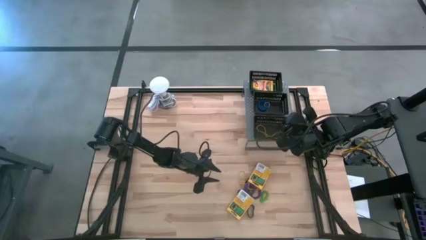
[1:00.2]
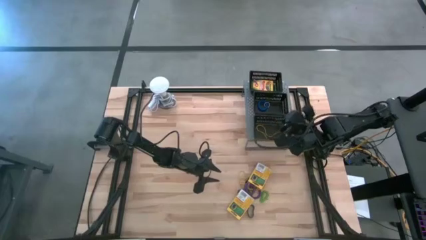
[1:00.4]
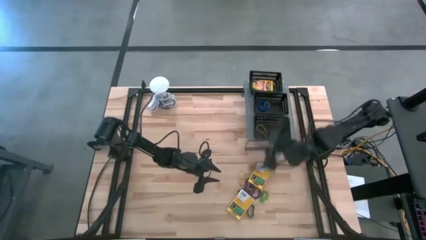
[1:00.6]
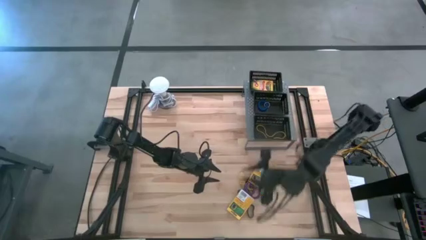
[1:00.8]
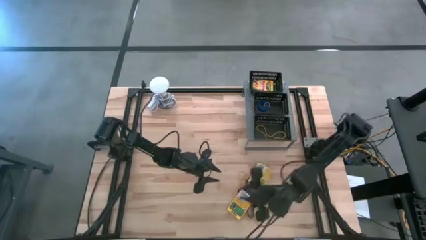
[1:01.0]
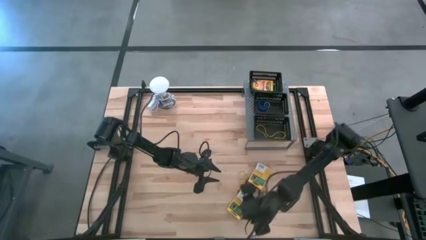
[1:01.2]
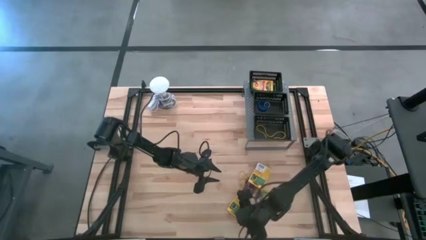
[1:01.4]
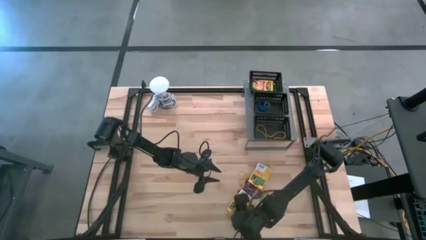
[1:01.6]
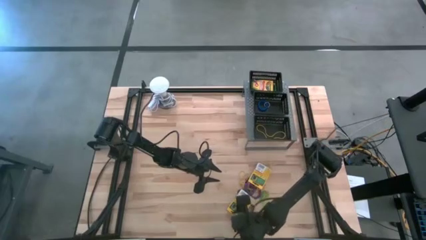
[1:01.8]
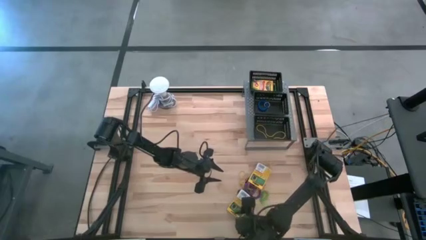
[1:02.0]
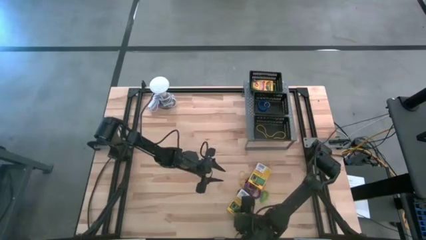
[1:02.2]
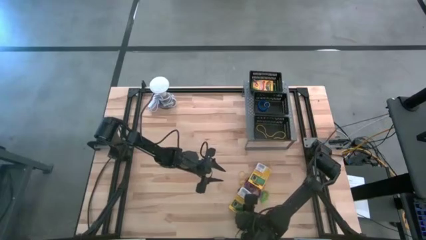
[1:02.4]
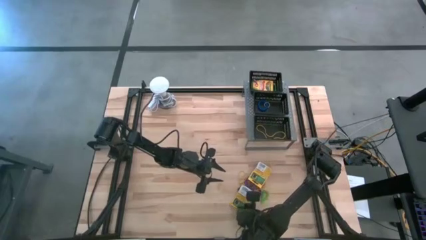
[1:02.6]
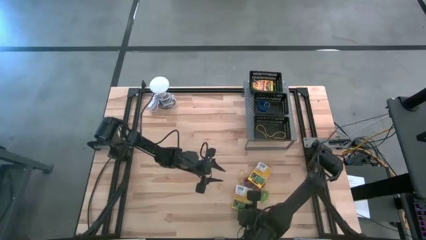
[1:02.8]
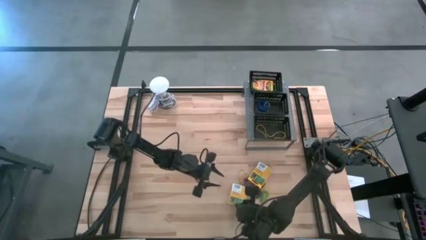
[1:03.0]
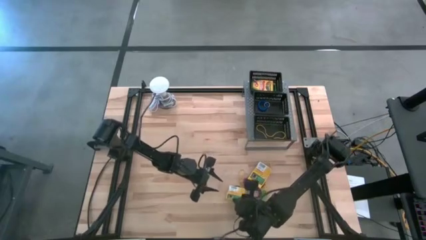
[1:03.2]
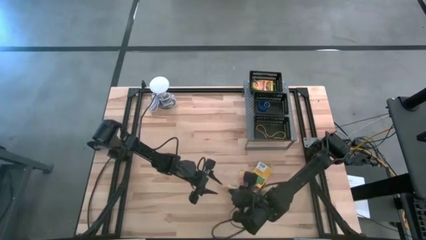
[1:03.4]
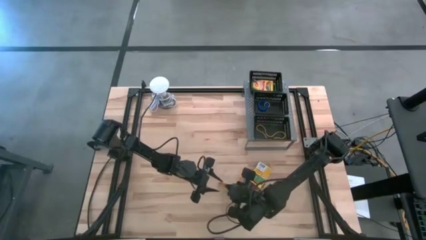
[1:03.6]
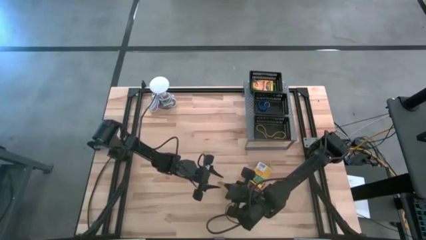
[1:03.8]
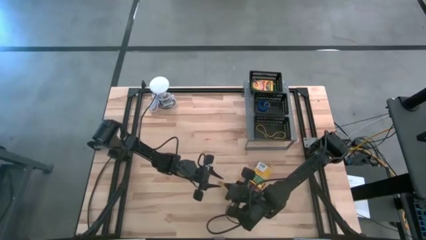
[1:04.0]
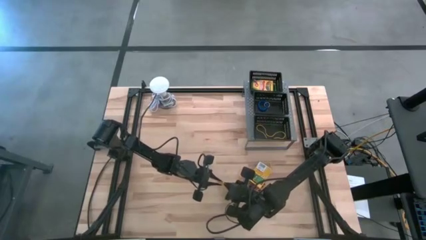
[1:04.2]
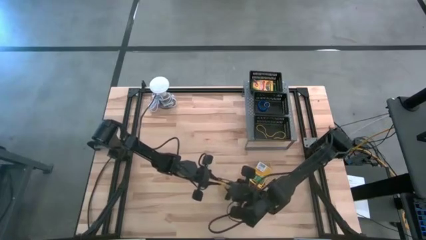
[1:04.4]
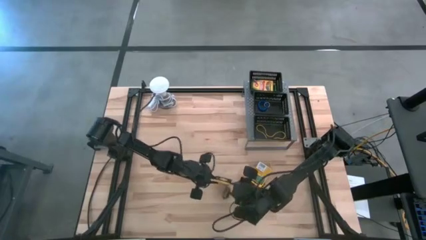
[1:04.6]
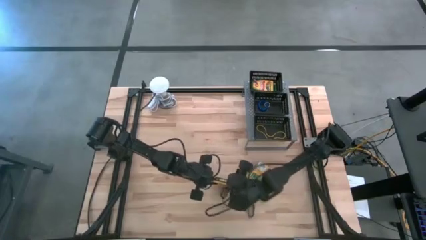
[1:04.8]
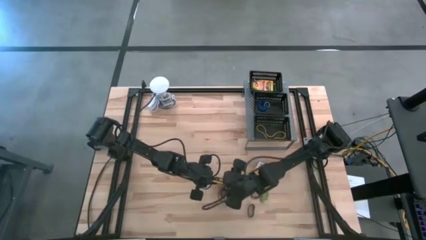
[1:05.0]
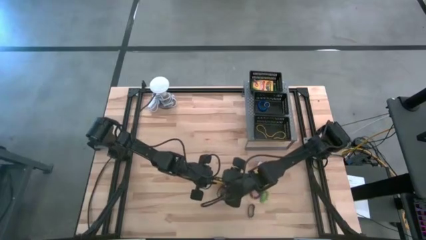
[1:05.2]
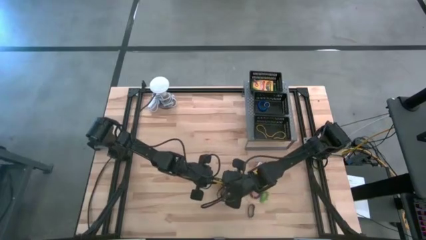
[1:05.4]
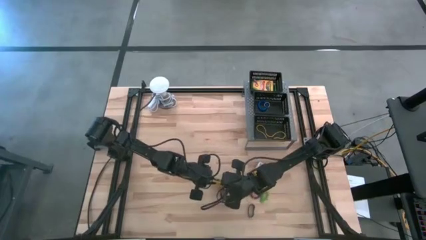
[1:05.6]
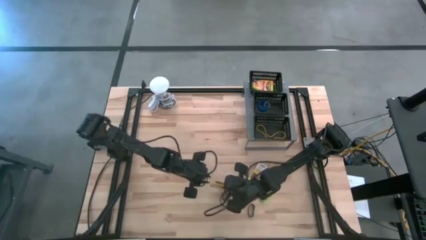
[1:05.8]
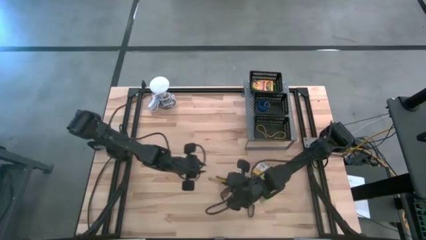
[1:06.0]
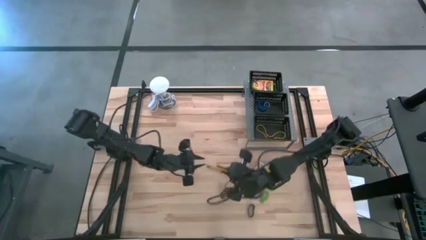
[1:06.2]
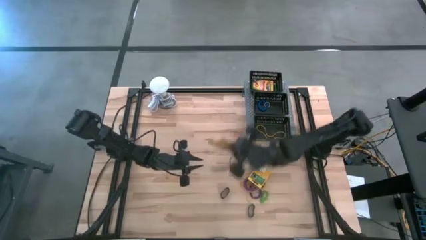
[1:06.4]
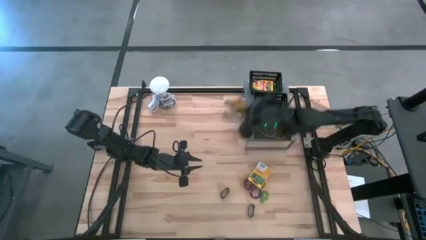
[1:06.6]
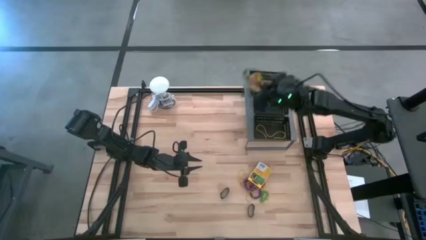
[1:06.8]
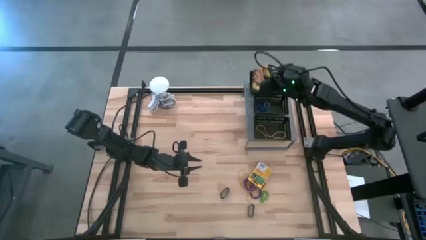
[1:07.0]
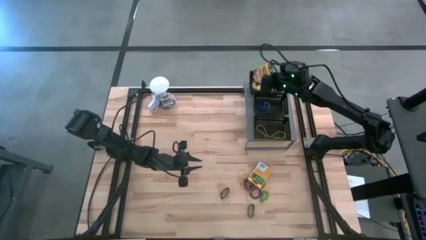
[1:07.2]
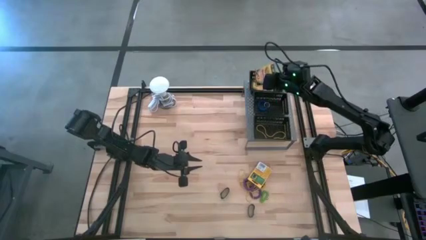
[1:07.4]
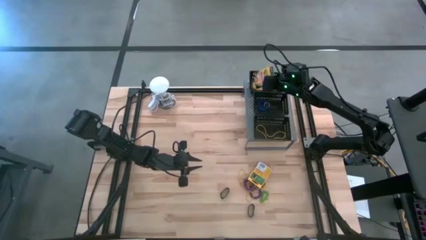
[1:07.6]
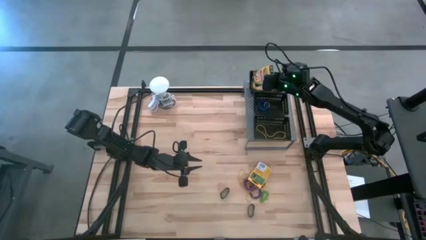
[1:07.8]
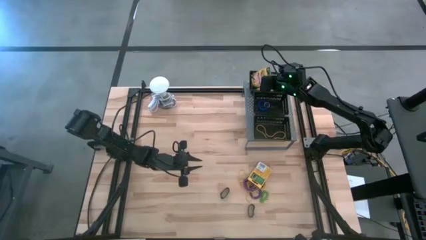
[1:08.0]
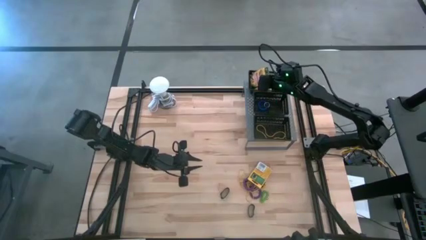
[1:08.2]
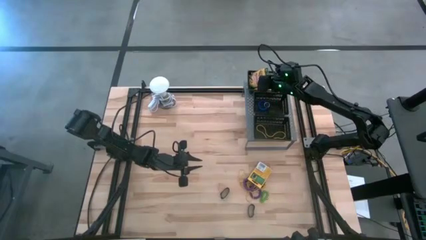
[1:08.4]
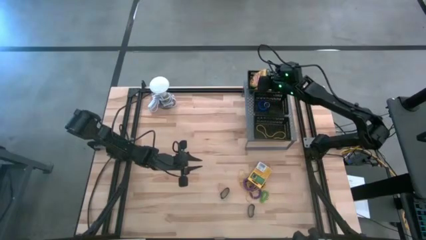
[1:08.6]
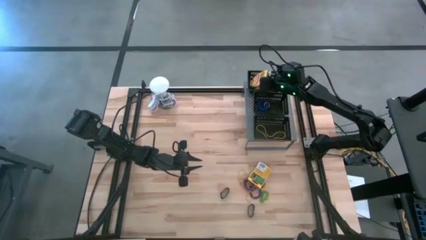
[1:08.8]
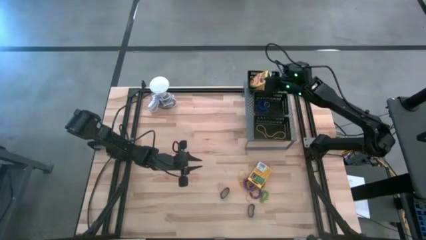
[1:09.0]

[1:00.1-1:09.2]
Task: Pick & Place Office Desk Supplies
Put the crayon box into the top black bin on the shelf

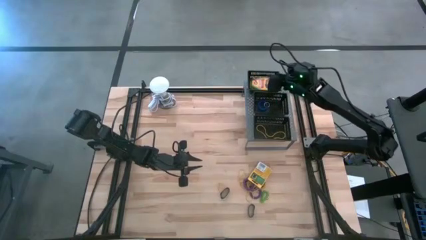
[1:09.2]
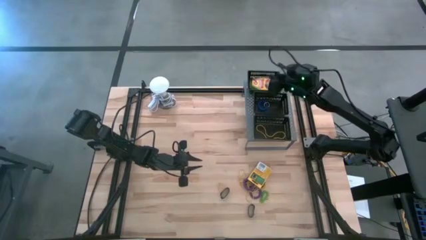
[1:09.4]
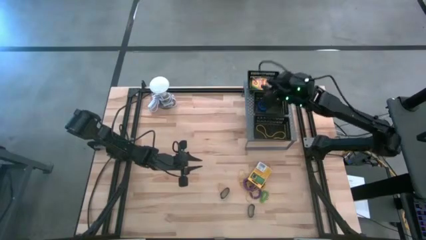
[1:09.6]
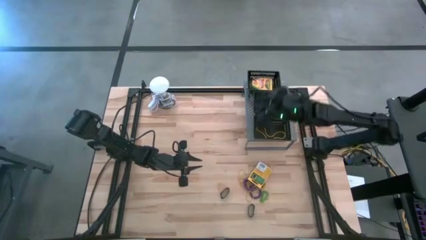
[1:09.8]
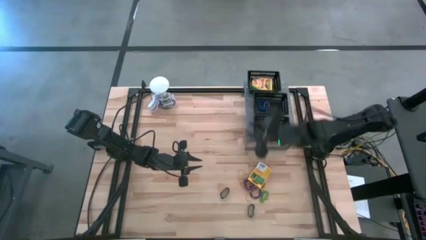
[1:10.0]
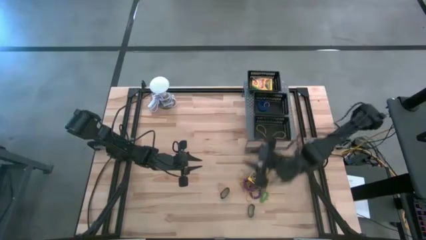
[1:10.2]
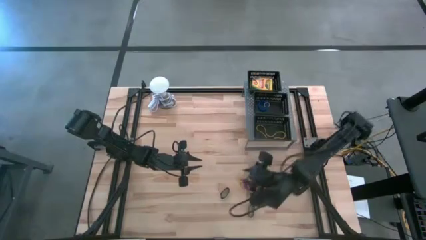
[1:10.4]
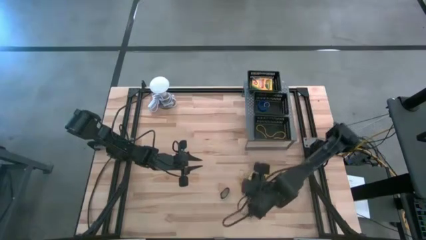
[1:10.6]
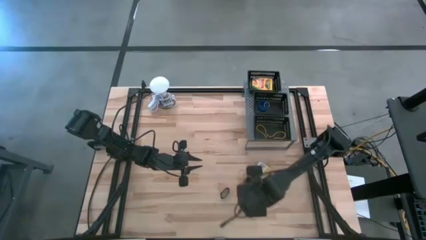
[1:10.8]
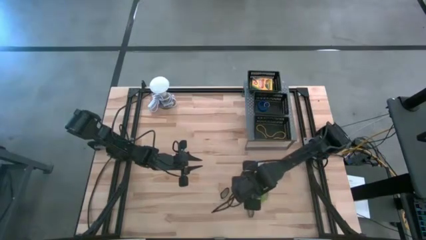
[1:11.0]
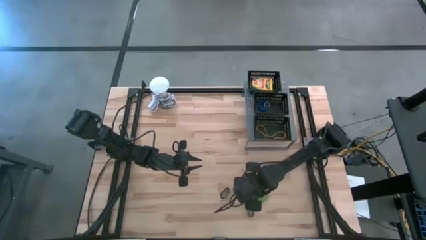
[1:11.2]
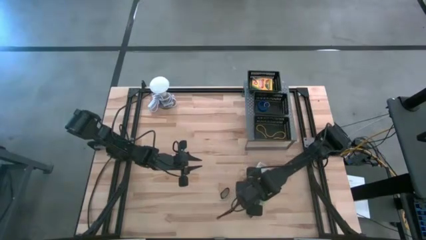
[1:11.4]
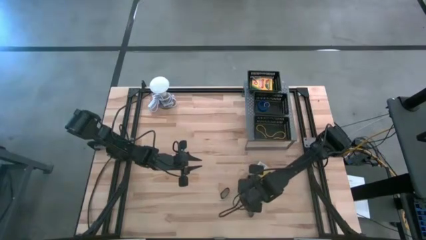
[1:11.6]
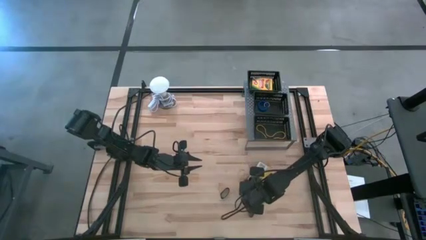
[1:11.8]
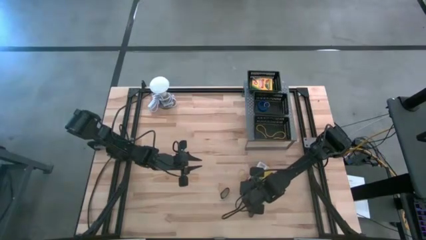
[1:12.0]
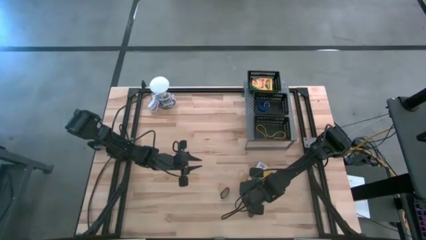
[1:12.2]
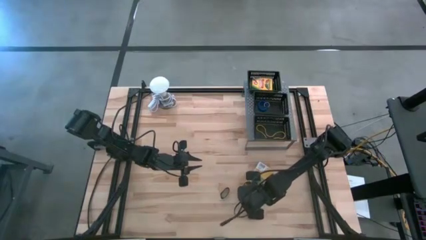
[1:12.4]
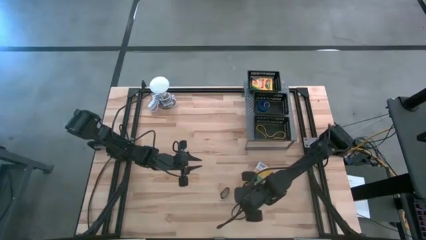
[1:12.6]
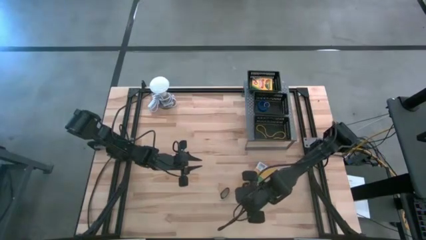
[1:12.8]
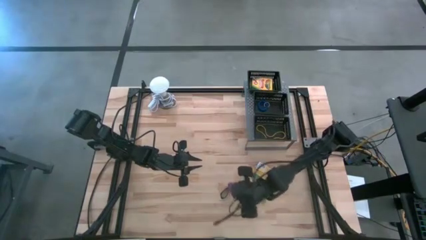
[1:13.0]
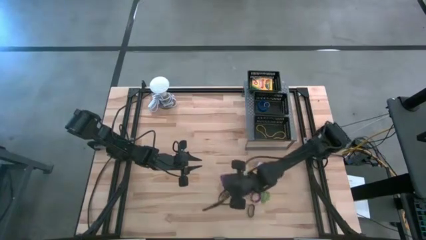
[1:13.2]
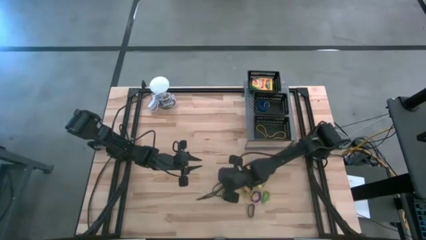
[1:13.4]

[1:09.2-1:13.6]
Put the violet spring keychain into the middle black bin on the shelf

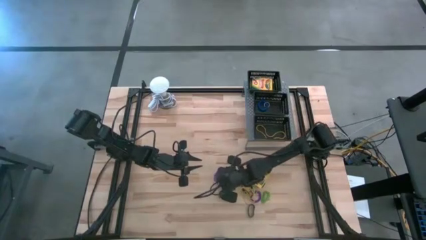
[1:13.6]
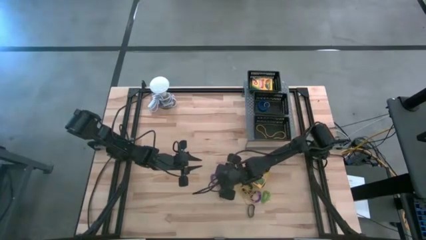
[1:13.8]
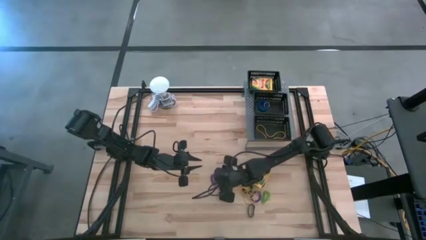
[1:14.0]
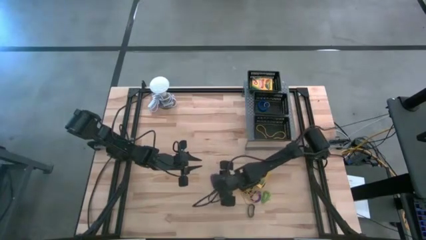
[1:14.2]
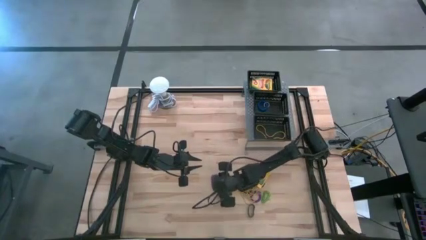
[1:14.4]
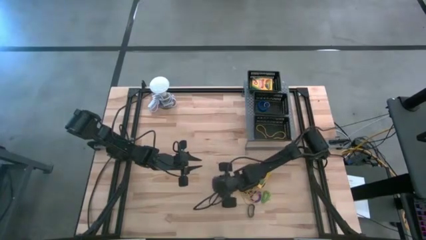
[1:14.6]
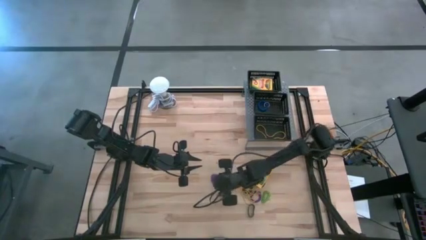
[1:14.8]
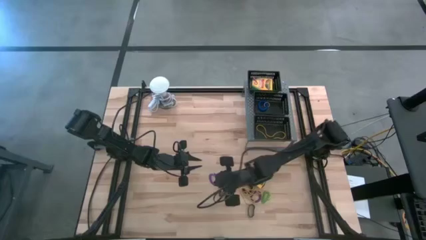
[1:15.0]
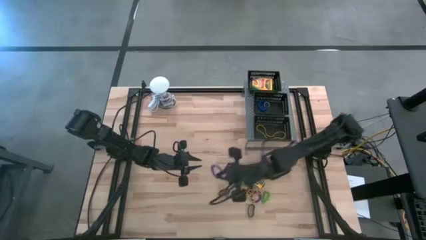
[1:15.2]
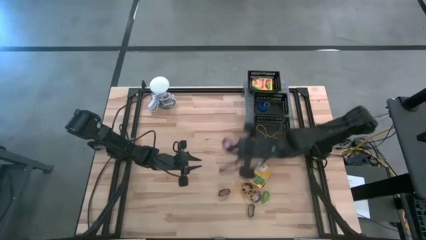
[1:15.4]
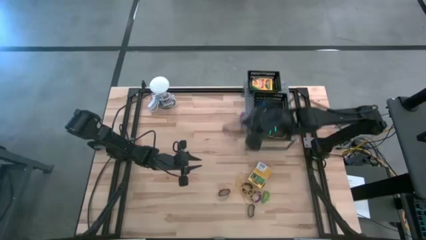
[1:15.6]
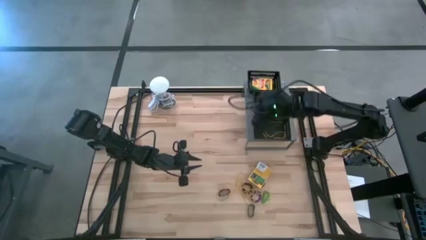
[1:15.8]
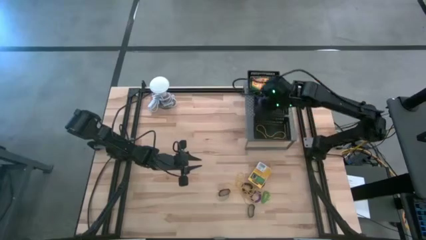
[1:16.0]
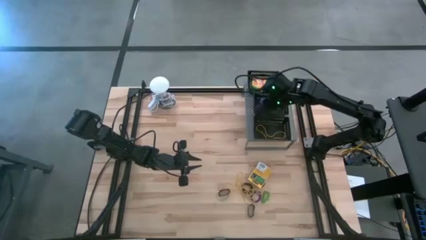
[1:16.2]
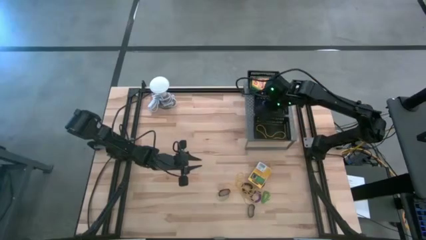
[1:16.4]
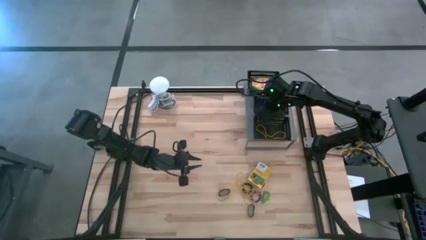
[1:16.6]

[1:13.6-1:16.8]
Put the violet spring keychain into the middle black bin on the shelf
